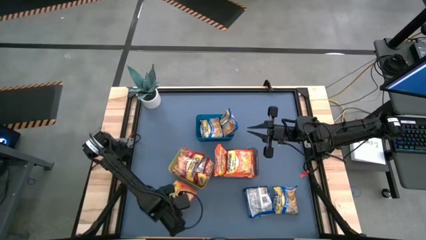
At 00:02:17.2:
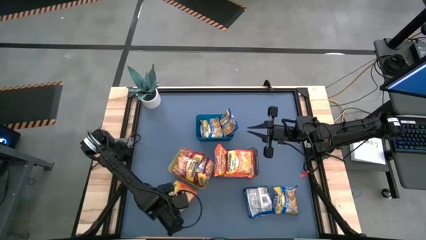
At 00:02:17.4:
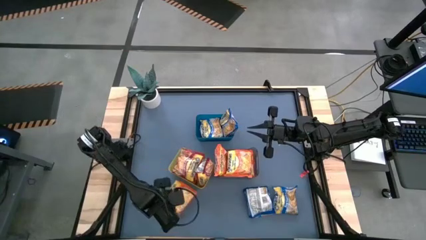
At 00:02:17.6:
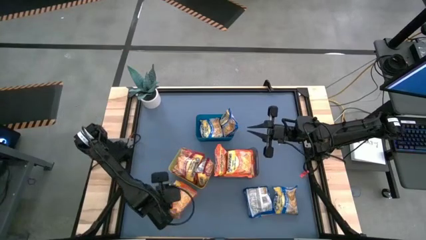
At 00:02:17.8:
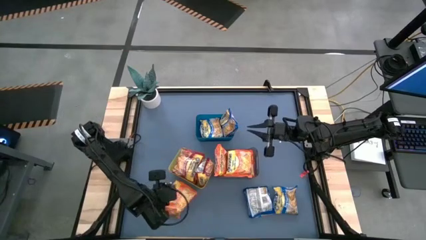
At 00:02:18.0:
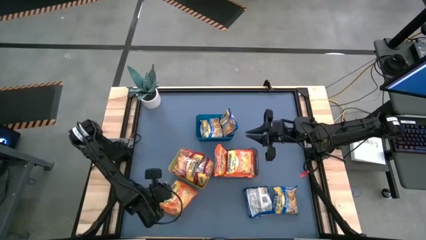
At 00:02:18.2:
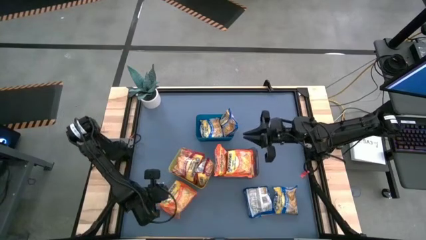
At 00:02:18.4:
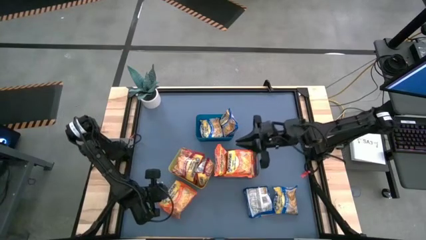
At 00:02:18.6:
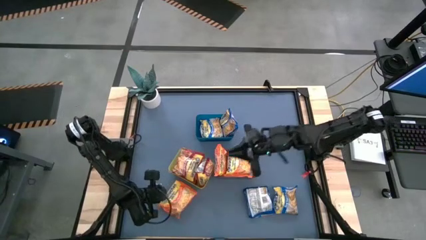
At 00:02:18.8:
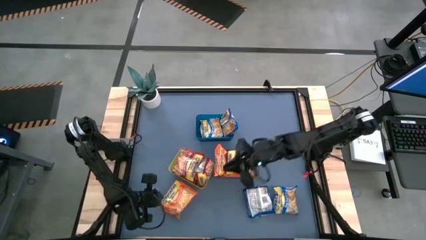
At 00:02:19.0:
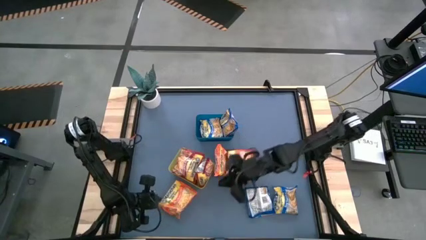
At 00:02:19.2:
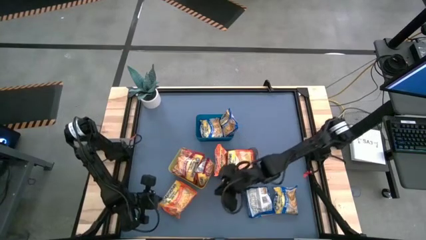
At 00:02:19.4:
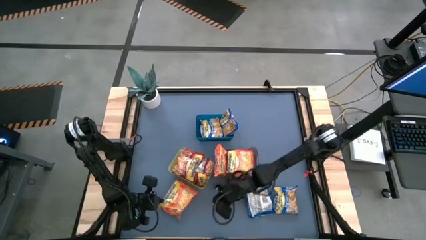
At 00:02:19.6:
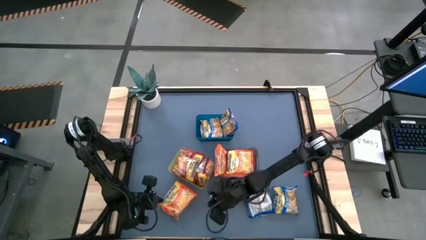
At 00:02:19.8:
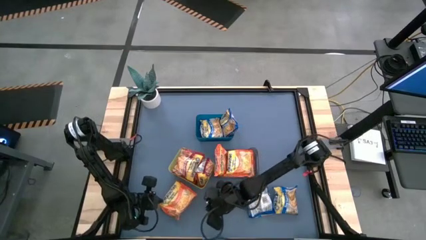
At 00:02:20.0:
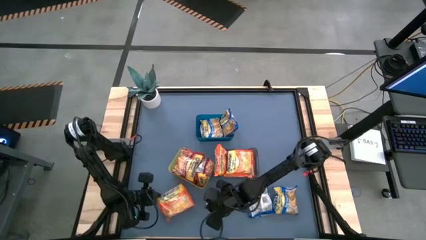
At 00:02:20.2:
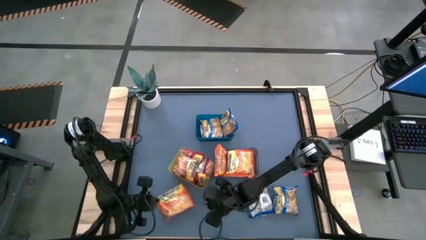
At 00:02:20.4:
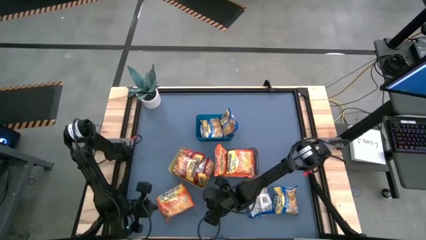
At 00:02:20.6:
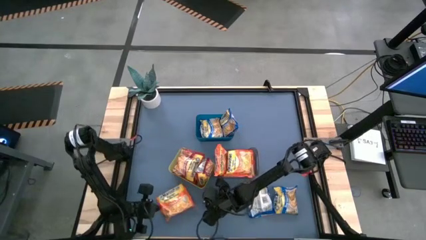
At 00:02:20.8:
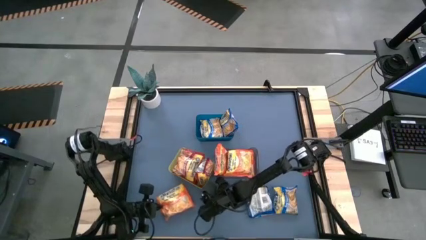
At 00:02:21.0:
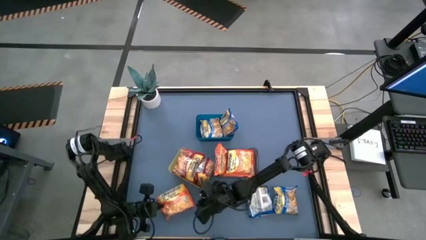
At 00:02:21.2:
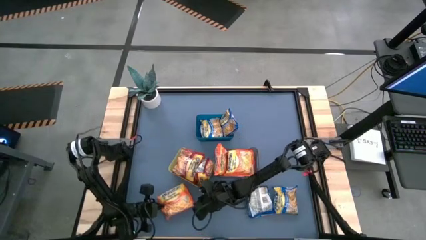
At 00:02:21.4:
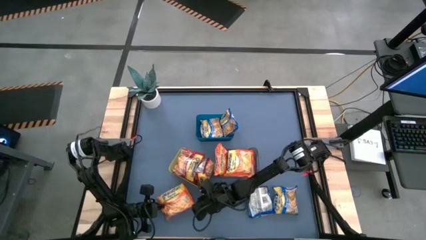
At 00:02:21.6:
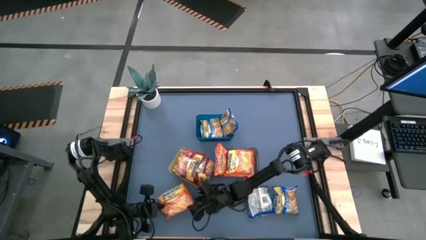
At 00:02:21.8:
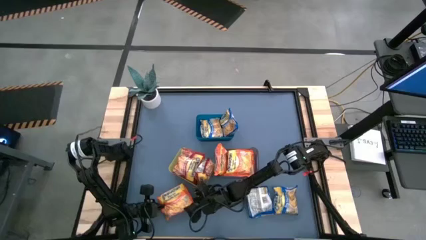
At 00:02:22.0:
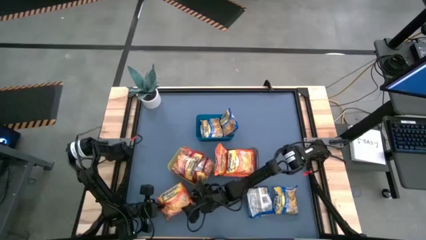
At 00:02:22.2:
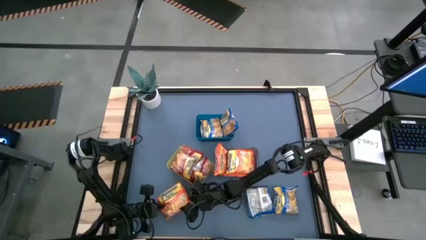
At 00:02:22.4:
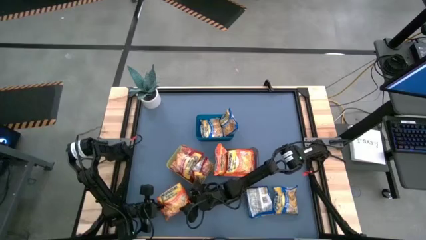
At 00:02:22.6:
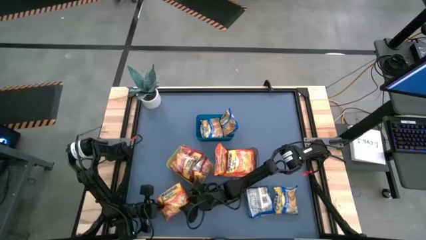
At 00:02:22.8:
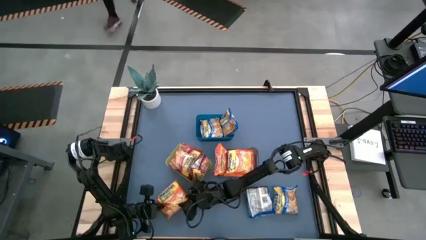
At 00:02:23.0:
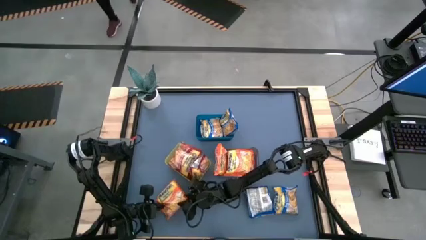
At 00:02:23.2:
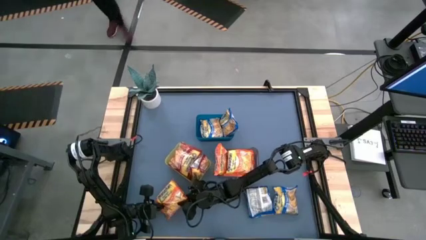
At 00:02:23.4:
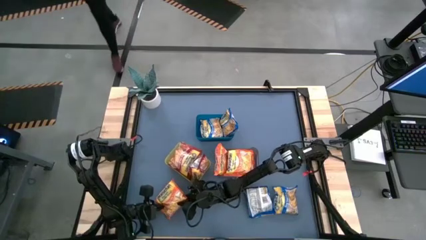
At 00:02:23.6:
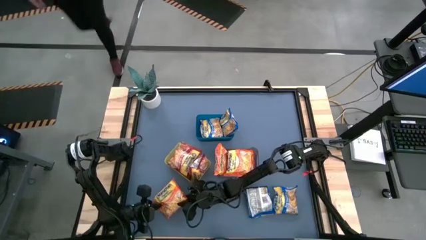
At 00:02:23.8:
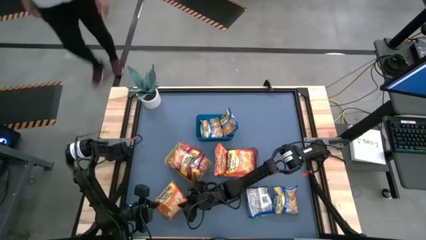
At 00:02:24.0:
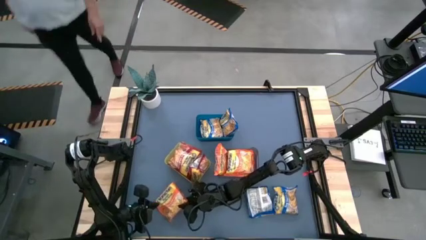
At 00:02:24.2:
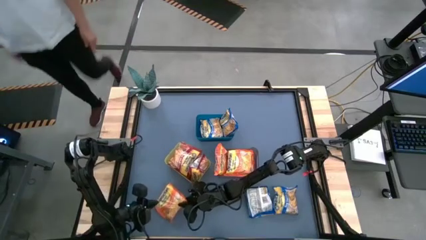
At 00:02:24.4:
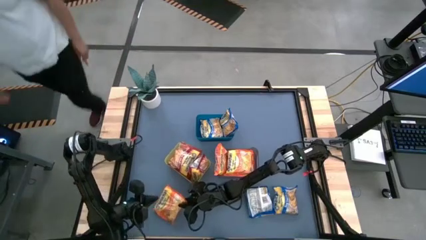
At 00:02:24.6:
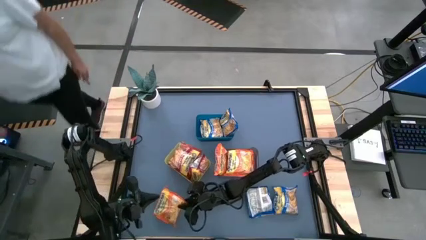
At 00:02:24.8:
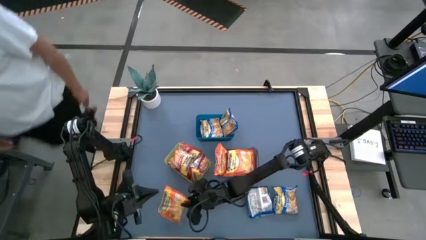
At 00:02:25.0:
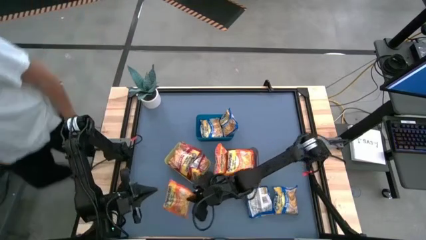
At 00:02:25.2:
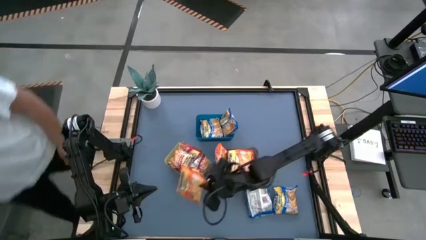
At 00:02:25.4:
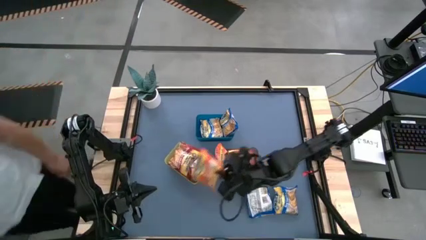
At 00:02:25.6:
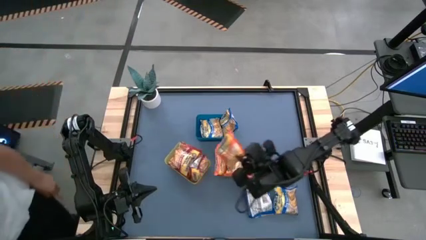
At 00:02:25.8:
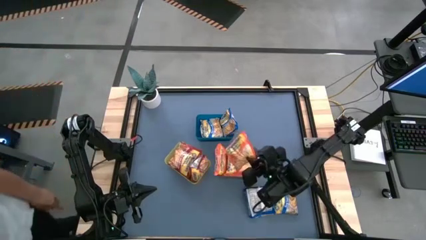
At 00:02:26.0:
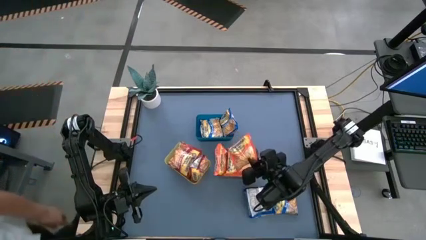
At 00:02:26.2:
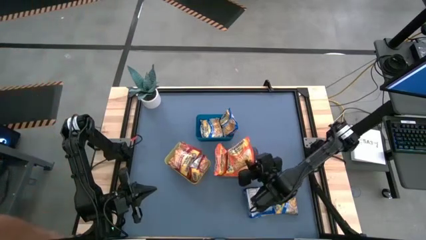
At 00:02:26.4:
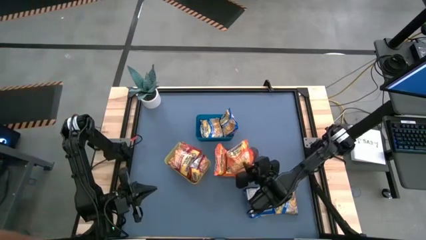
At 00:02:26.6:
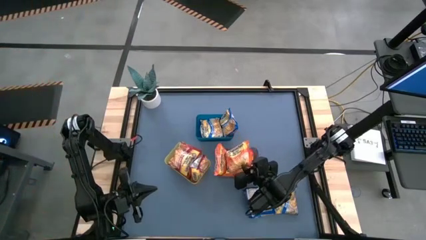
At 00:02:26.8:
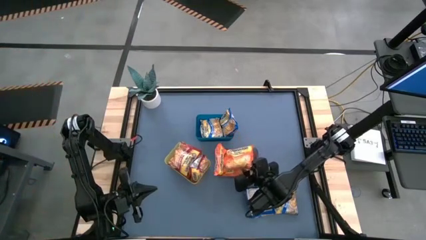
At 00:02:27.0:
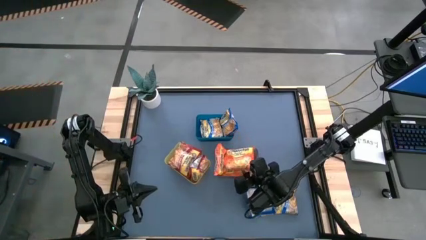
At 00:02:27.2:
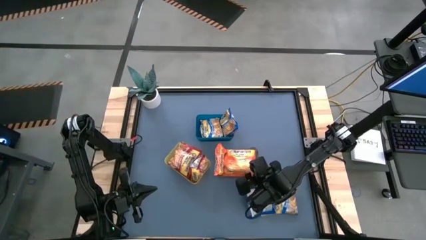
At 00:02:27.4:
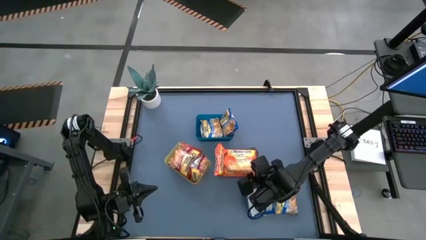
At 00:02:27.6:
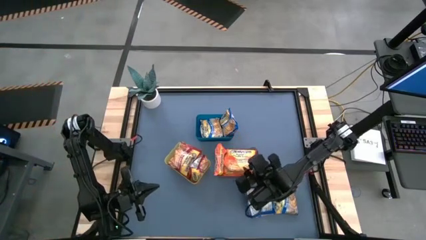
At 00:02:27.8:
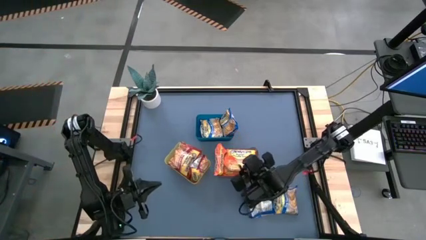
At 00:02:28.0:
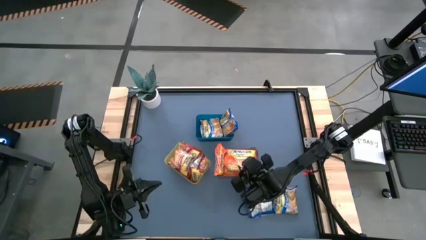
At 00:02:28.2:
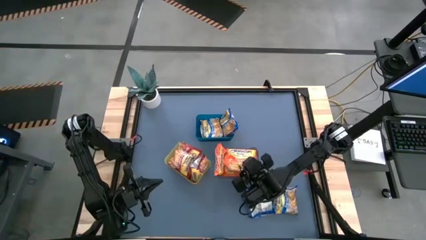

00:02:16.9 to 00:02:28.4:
Task: Sort Maruchan noodles
Stack the orange noodle pack on top of the orange noodle pack in the black bin

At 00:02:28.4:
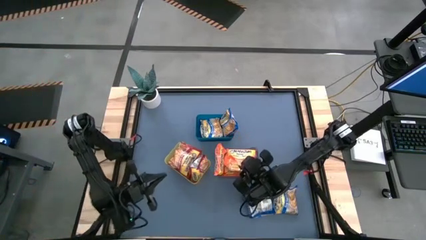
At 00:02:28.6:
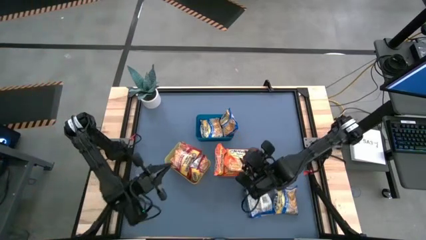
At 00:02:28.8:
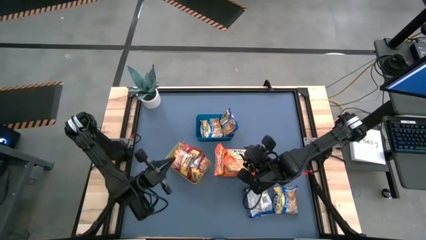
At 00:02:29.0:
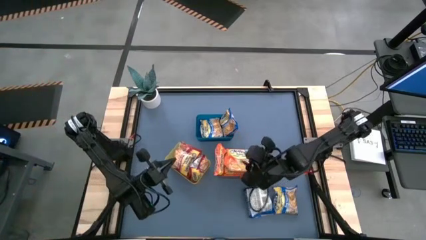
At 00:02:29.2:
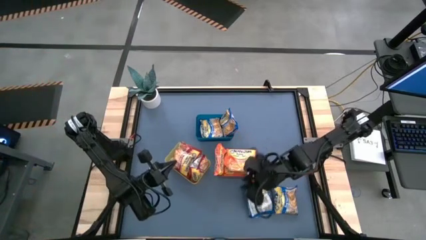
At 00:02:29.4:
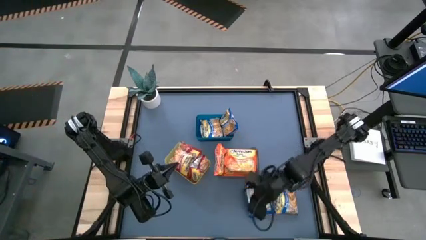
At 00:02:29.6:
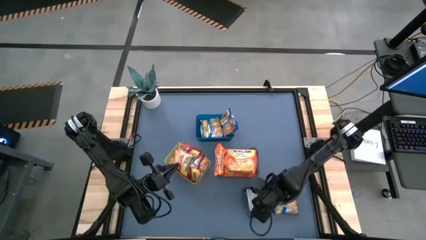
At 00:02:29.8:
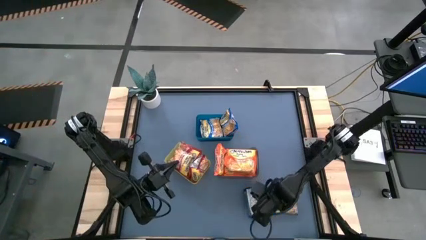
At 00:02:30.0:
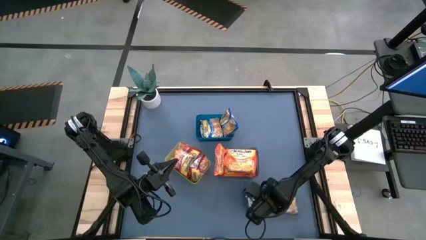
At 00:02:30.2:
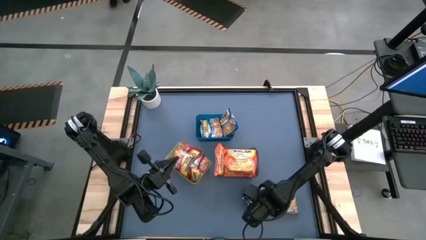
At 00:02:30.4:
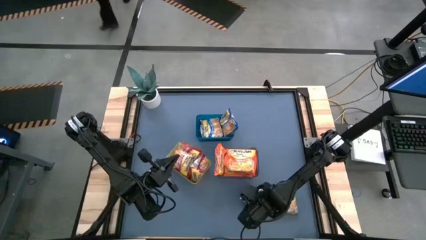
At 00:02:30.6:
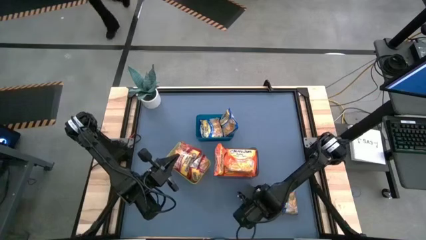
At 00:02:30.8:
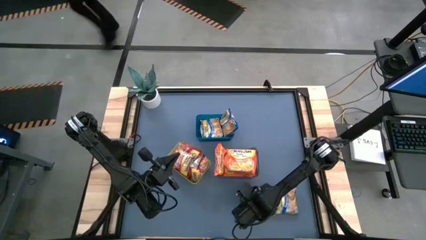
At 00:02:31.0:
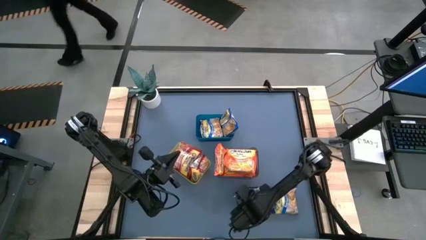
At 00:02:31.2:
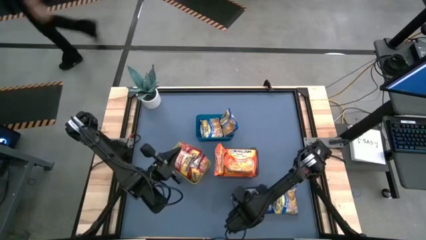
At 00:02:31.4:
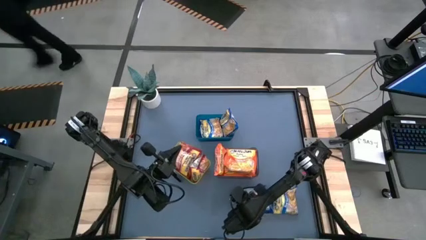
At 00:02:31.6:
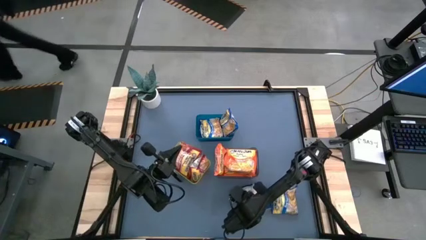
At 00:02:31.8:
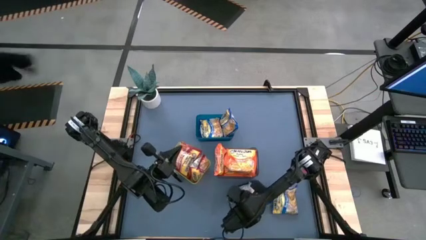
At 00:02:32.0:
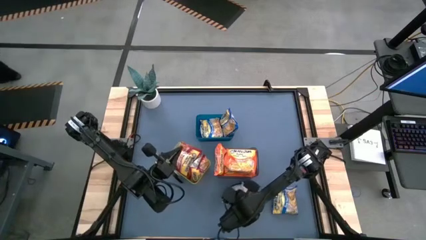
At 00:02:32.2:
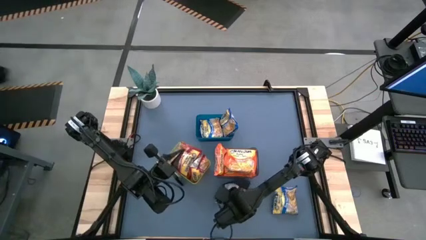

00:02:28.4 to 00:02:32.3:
Stack the blue noodle pack on top of the blue noodle pack in the blue bin
